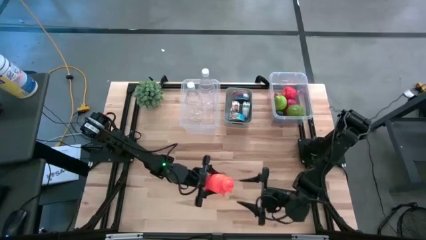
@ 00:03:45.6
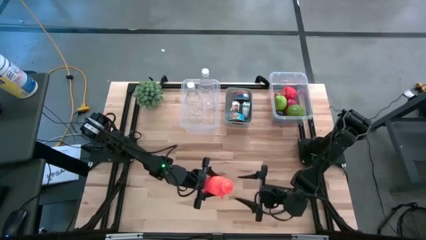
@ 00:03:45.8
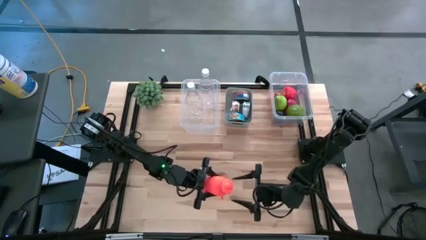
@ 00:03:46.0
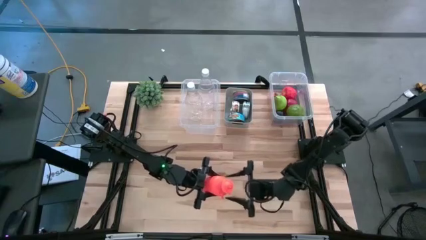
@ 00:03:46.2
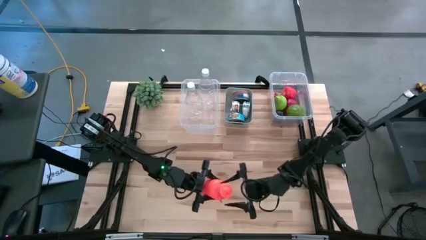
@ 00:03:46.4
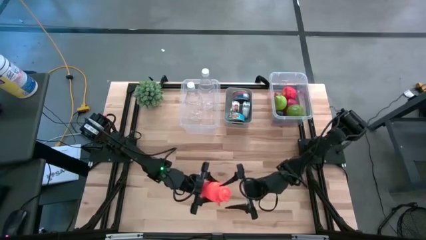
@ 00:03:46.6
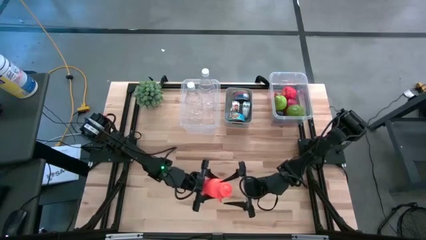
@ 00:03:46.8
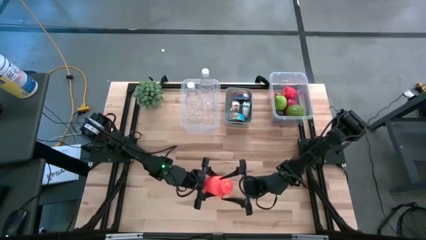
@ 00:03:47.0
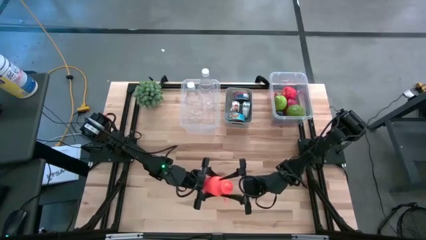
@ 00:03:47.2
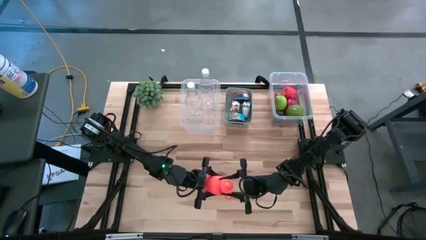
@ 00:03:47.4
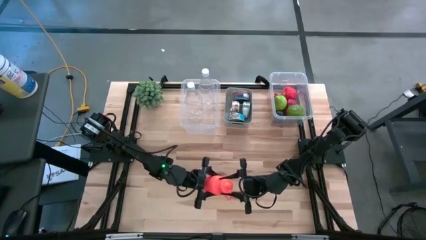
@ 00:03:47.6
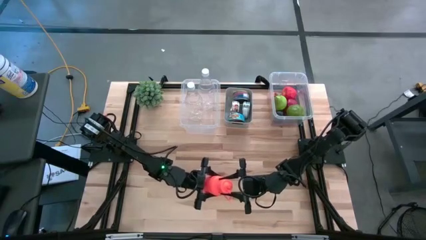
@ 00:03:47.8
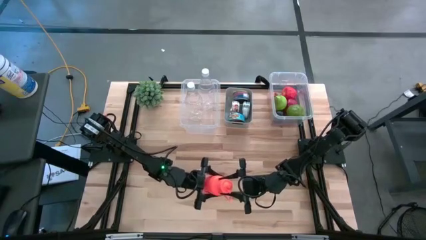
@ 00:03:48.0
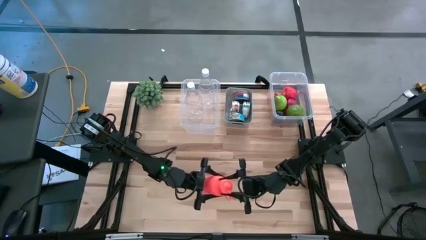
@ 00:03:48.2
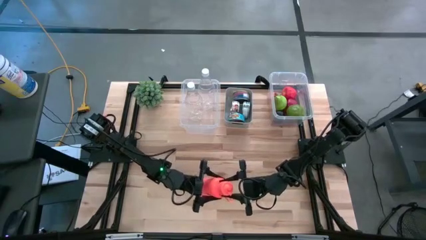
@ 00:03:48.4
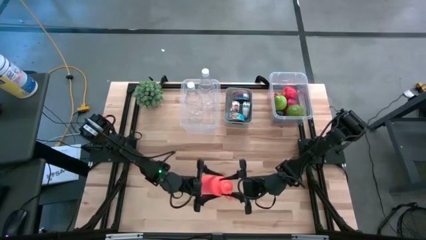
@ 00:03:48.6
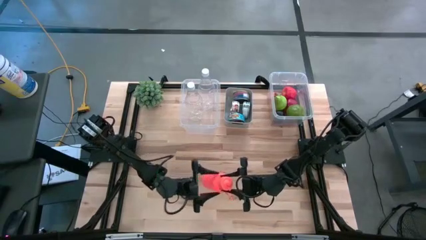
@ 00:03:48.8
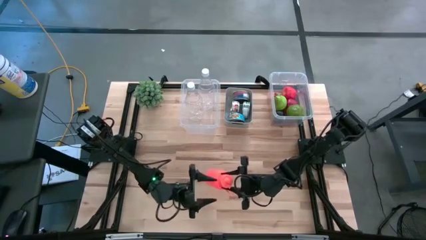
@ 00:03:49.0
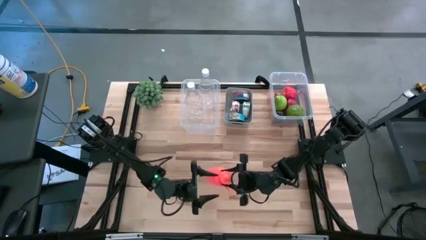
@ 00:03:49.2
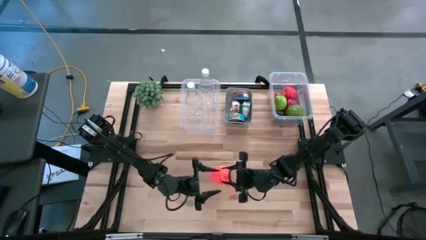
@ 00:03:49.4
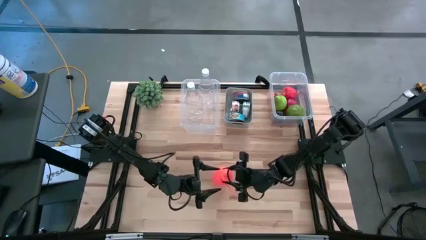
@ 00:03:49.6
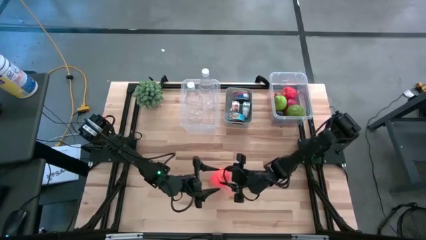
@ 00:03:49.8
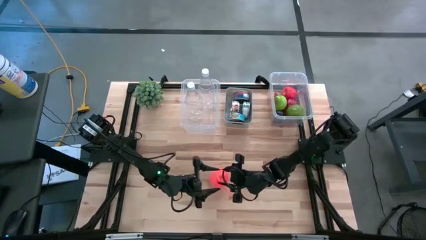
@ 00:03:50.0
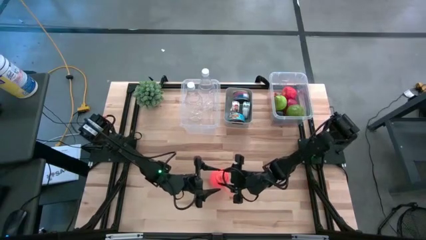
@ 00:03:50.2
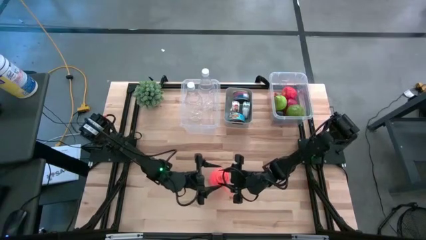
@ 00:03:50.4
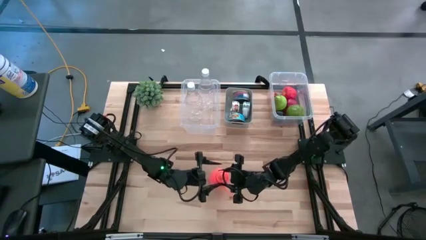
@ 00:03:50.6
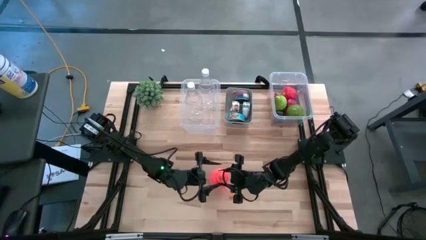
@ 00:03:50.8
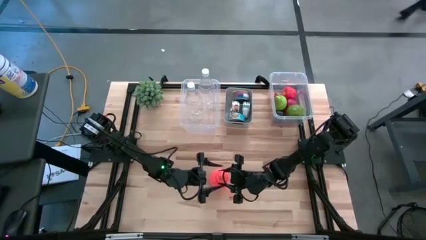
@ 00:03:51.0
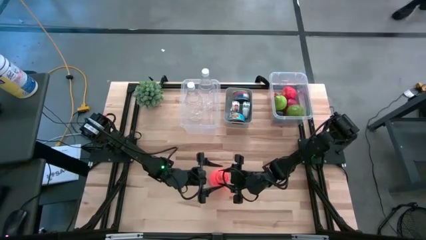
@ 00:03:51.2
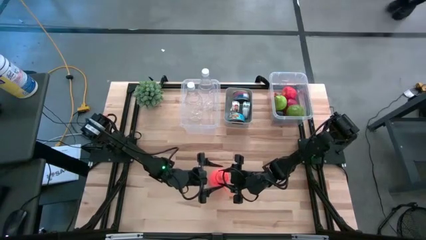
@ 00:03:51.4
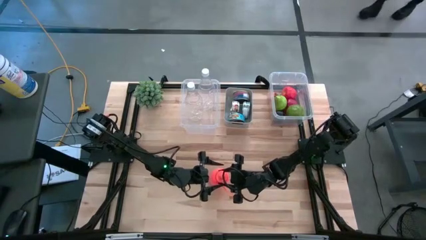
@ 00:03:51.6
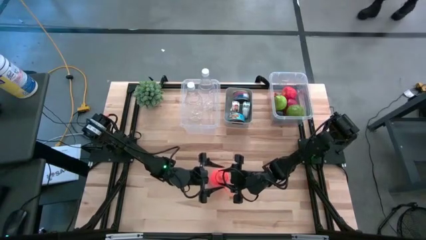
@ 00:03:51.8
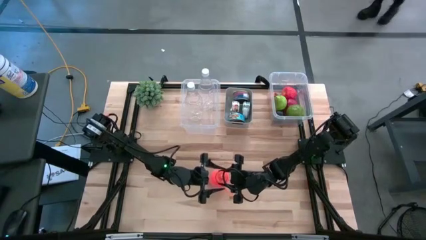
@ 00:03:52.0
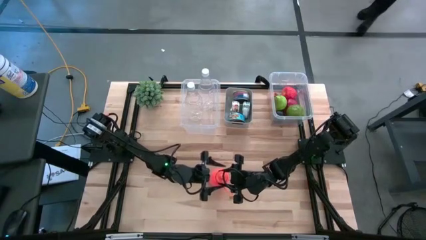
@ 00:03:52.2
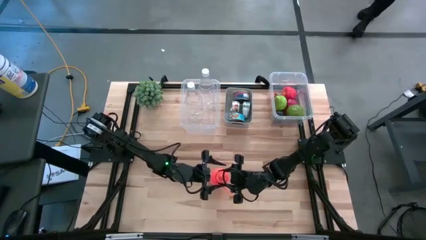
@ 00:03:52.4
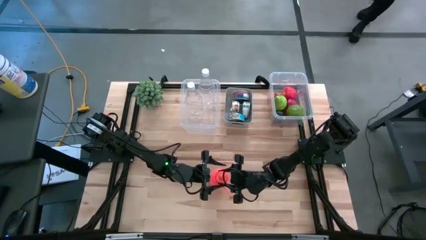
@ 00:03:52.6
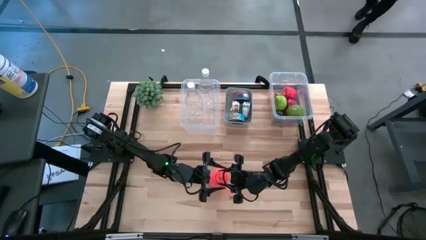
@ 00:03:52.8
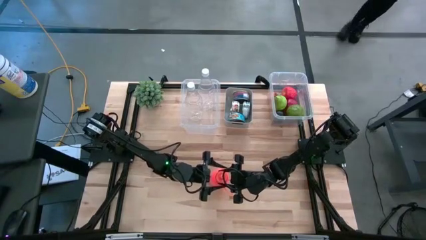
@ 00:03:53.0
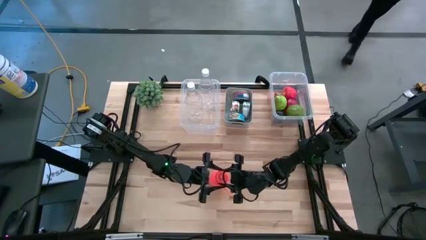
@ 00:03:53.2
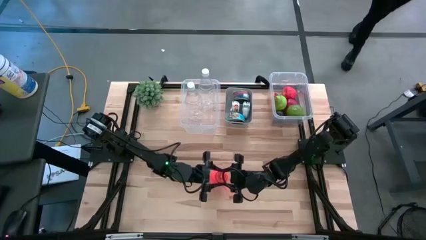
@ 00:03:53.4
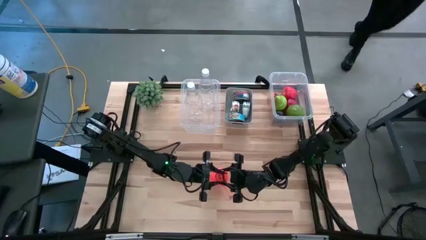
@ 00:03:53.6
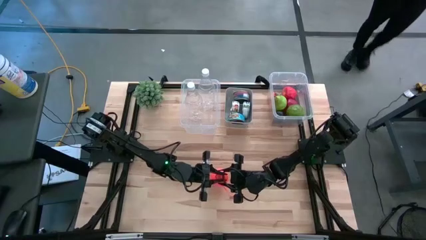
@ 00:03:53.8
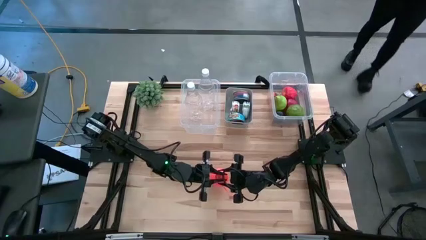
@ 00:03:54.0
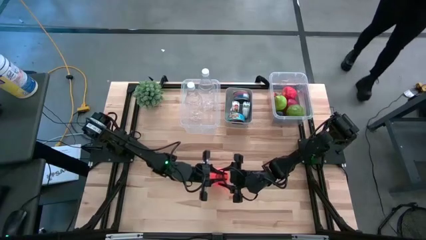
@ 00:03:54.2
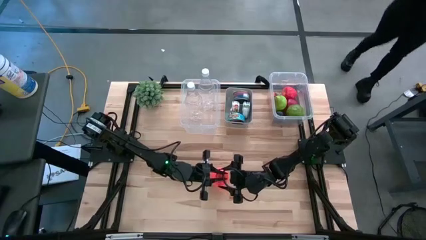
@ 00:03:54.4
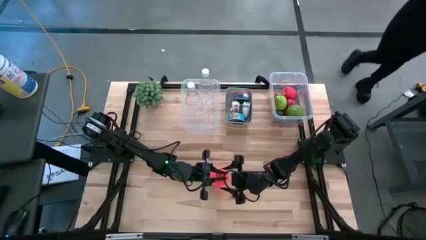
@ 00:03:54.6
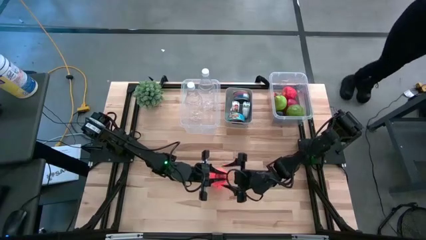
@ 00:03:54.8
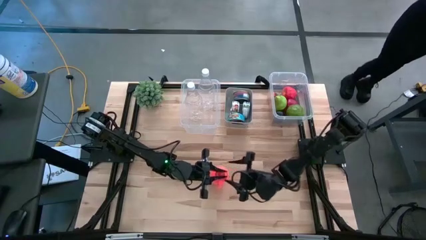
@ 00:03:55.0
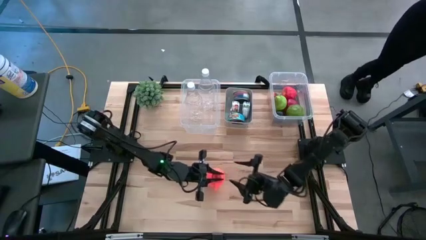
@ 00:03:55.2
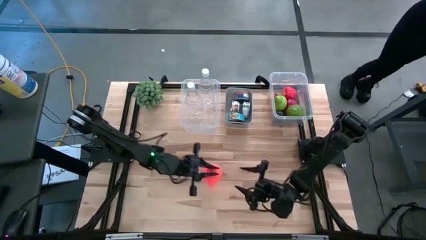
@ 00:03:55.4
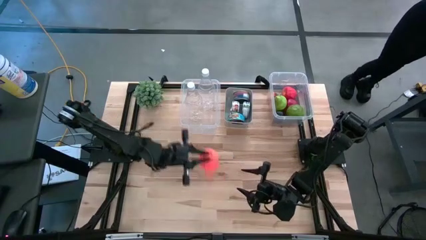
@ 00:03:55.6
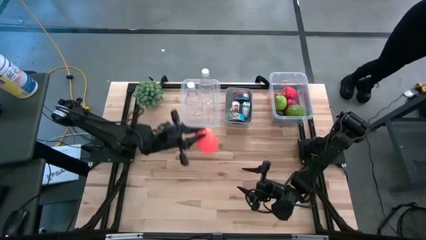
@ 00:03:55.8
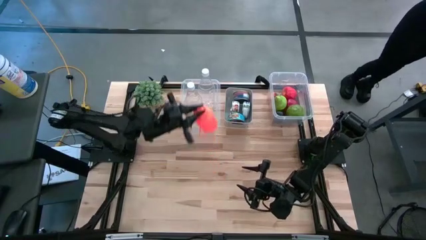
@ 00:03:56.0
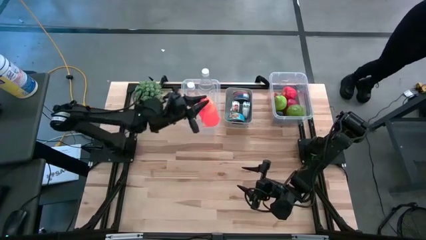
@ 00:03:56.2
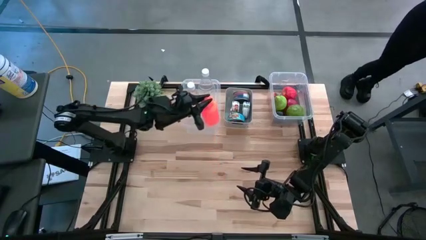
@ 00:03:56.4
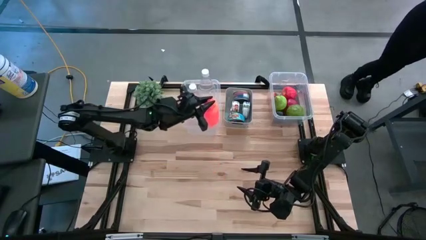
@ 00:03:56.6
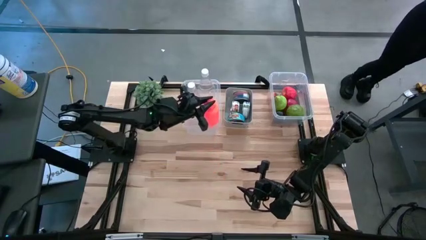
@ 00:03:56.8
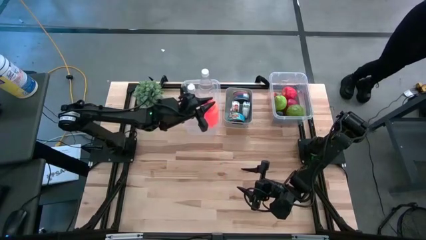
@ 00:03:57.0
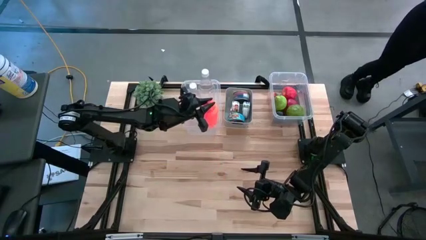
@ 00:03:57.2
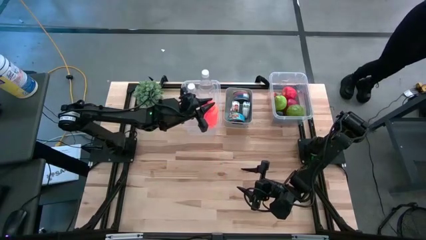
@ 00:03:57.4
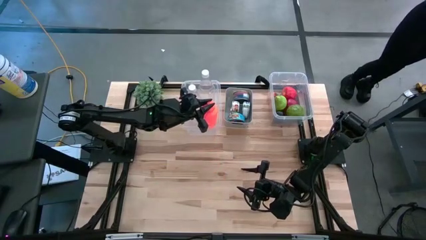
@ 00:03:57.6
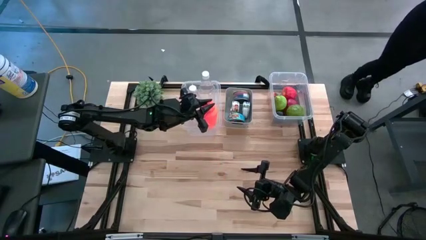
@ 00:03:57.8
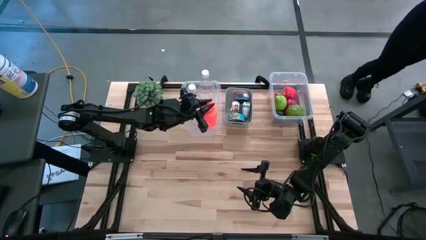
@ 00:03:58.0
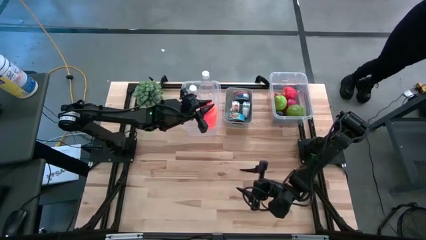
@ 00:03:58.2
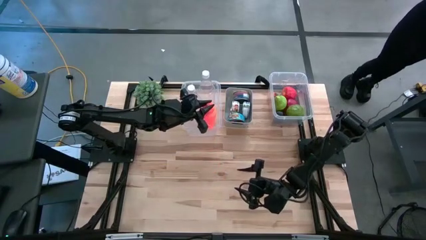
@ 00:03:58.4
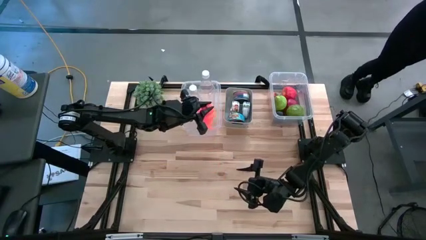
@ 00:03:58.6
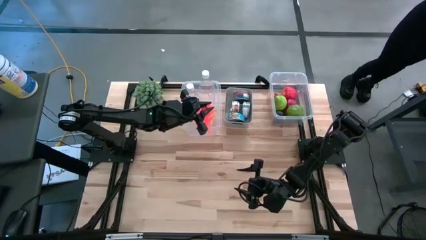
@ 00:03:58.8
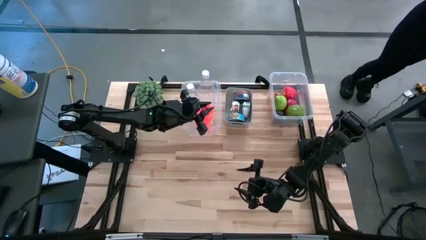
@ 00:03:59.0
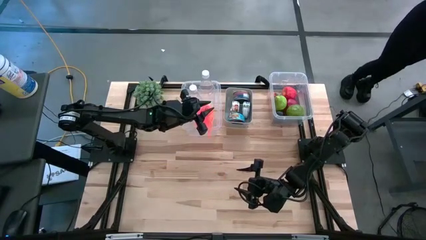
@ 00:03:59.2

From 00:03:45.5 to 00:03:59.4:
Task: Pick & Place Food Item
Put the orange bottle into the left transparent bin

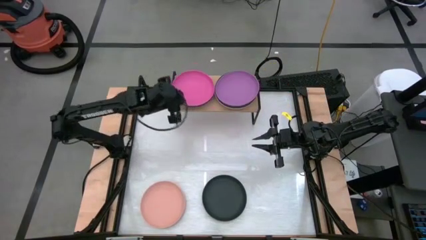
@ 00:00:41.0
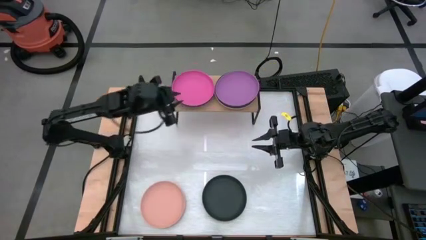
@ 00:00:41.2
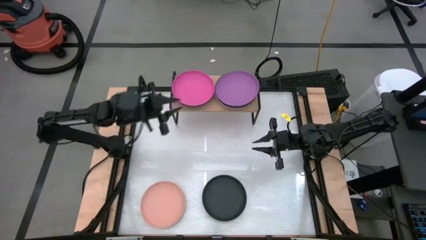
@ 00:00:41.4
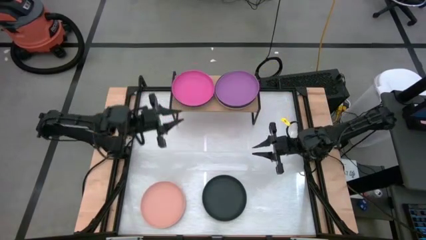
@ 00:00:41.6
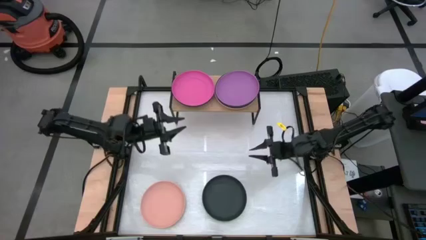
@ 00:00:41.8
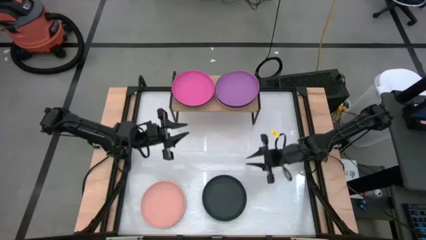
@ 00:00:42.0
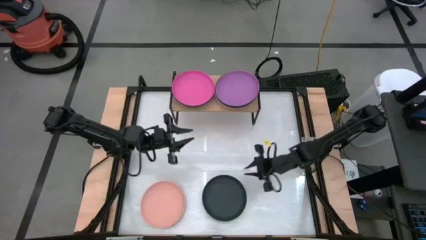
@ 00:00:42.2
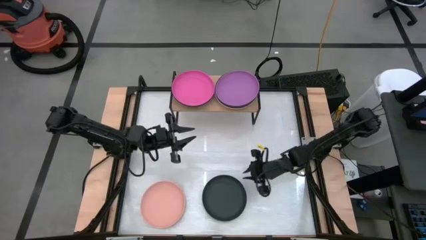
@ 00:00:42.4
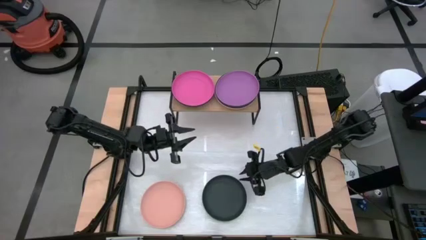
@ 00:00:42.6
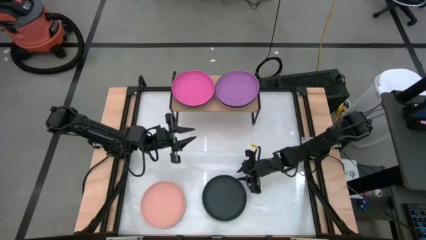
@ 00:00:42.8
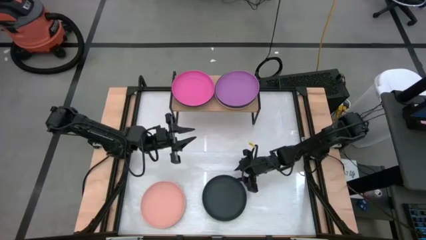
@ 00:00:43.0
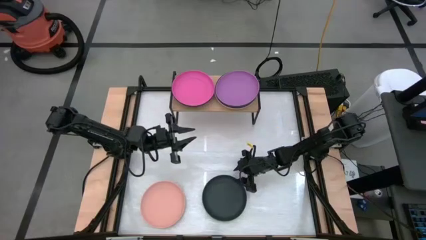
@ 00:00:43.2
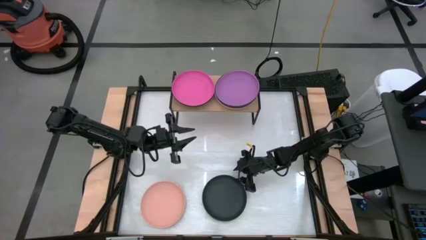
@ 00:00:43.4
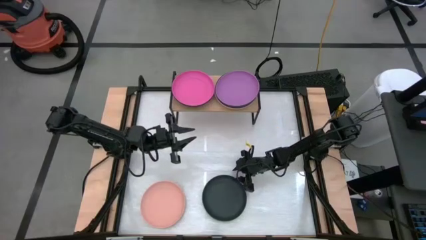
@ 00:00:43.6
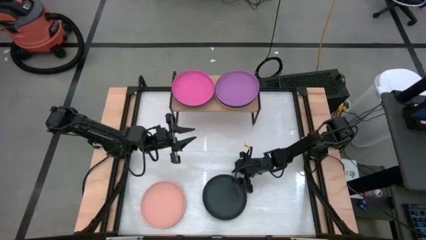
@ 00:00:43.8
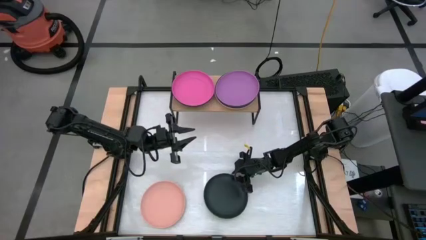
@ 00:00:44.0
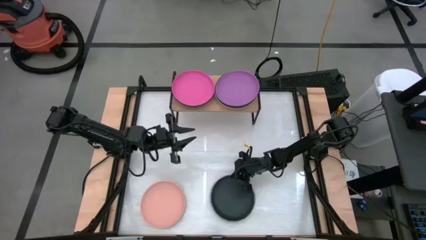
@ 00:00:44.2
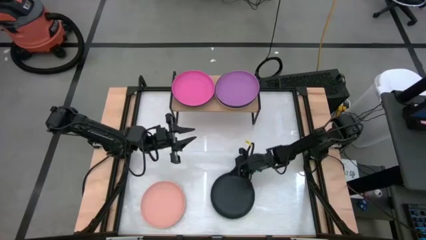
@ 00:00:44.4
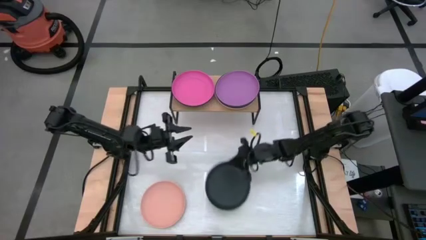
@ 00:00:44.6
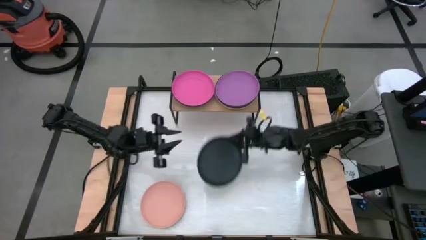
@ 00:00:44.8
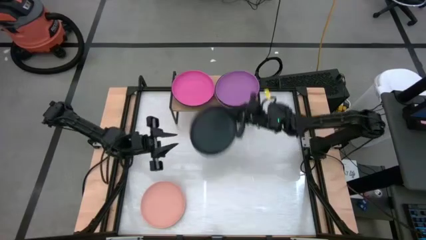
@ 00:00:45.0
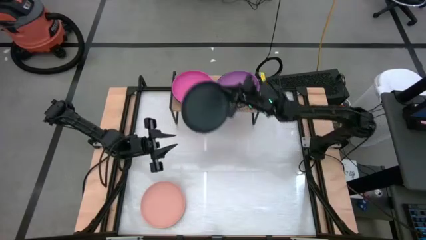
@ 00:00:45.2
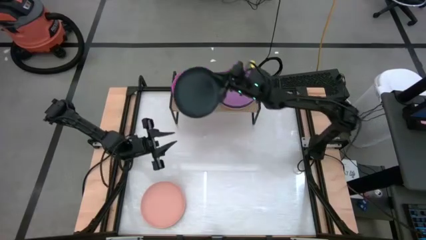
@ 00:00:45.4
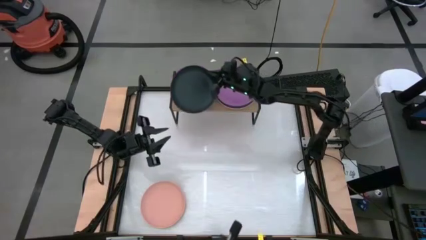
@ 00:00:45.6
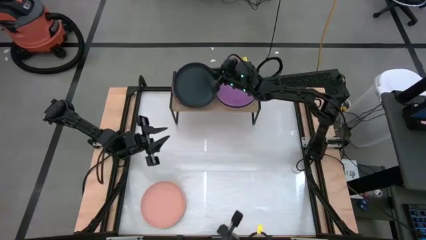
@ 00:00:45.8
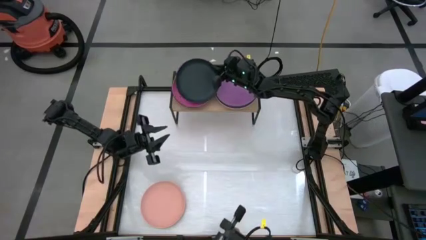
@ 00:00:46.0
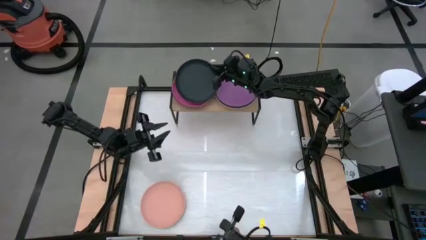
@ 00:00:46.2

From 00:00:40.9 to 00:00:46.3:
Task: Place and stack plates onto a shelf
Stack the black plate on top of the pink plate on the shelf
